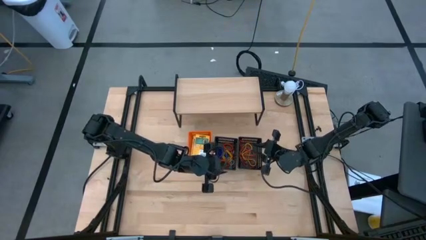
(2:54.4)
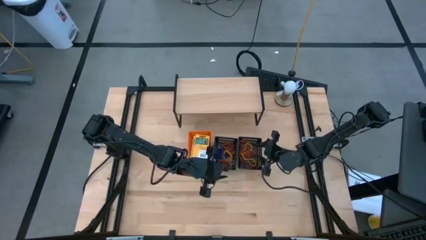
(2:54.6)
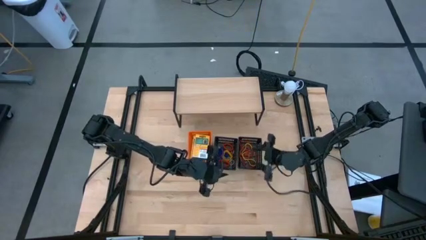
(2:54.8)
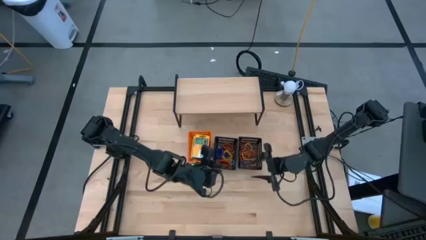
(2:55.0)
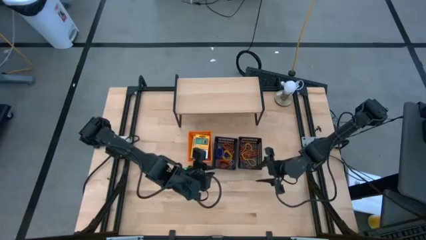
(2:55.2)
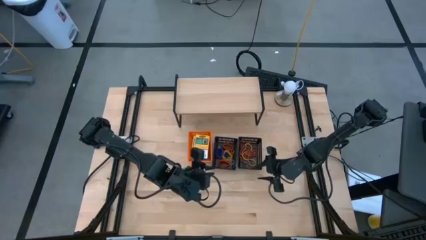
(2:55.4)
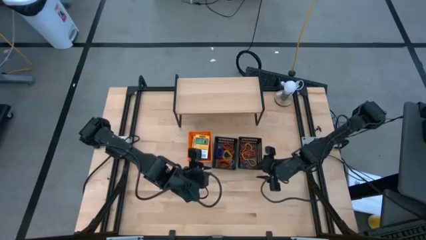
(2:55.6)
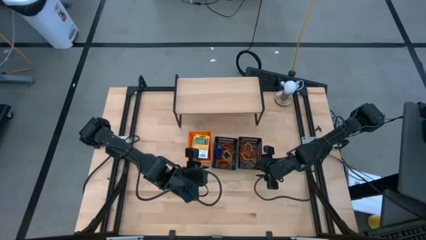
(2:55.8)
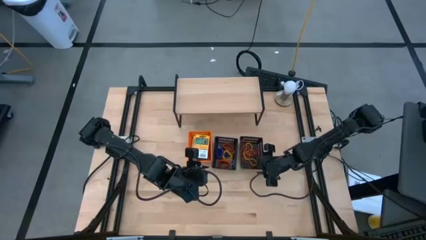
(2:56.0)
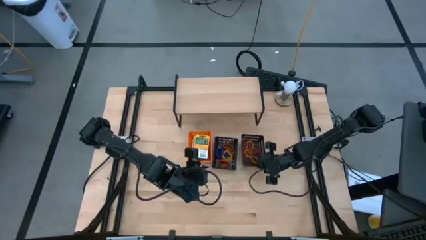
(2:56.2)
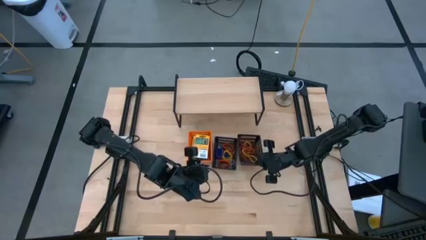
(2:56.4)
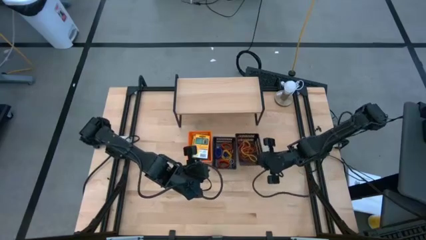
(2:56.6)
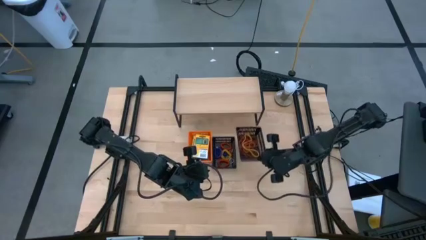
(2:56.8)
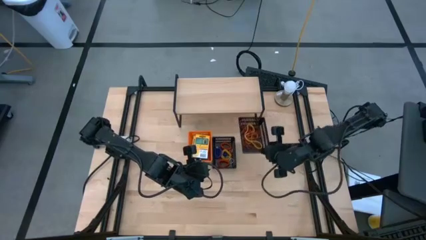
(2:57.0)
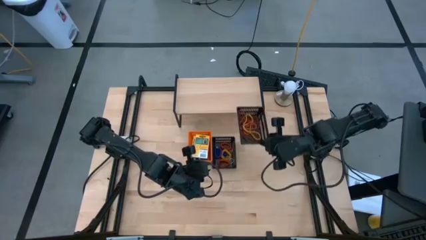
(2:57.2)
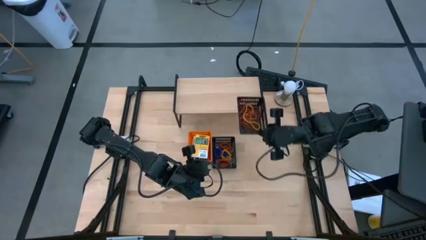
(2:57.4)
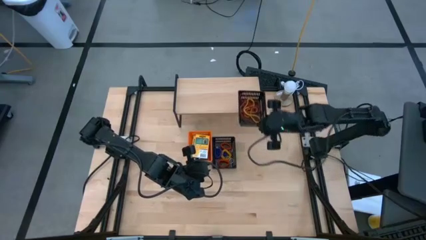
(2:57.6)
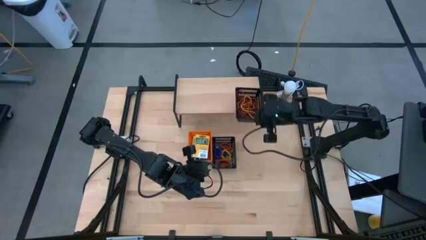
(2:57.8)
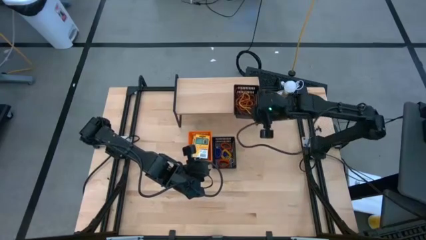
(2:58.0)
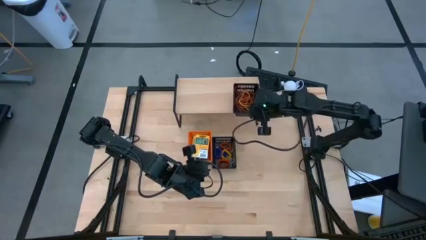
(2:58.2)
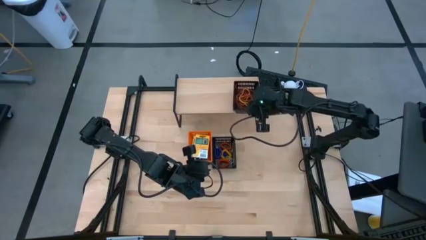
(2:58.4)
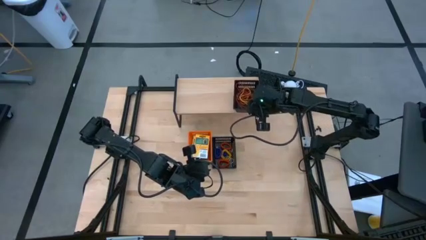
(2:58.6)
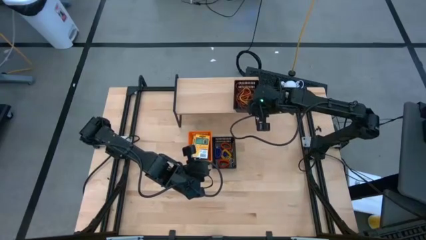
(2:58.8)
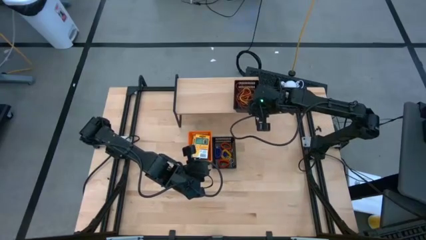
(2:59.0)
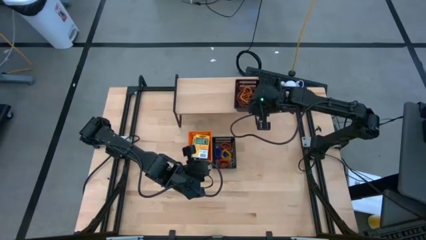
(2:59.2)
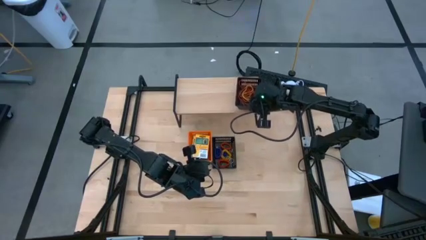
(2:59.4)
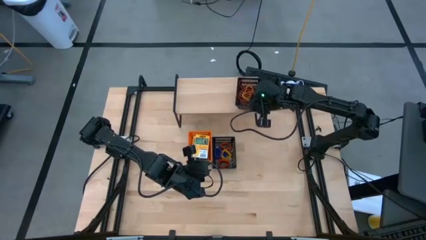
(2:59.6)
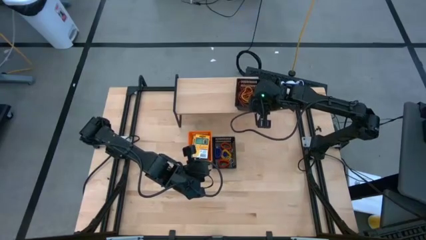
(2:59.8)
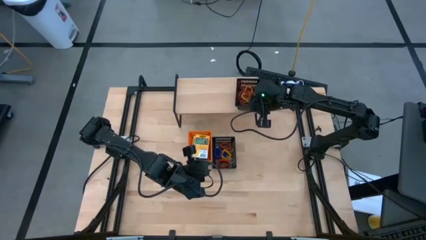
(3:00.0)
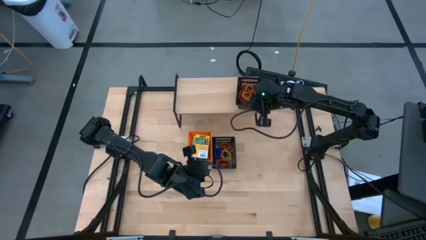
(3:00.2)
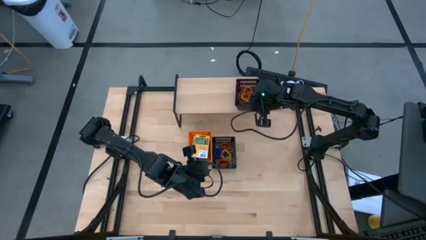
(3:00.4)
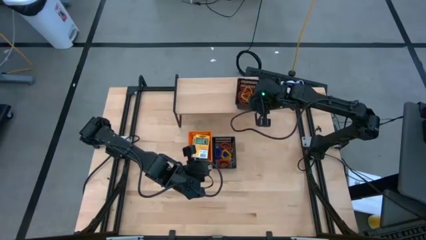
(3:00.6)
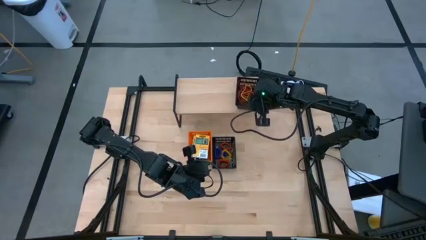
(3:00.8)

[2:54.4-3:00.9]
Task: Pick & Place Office Desk Supplies
Put the right black bin on the shelf

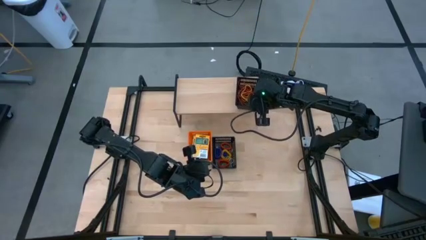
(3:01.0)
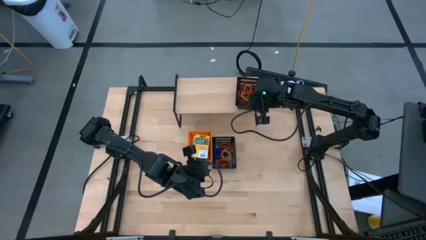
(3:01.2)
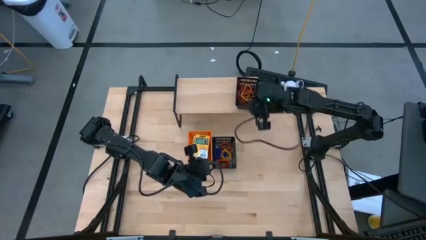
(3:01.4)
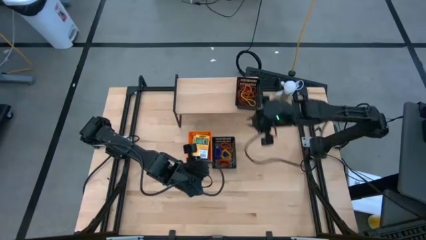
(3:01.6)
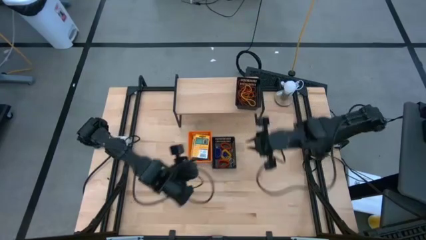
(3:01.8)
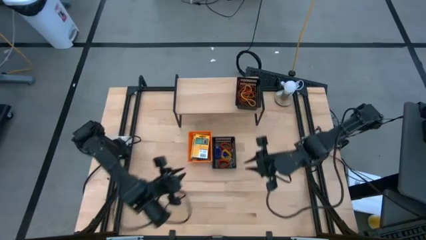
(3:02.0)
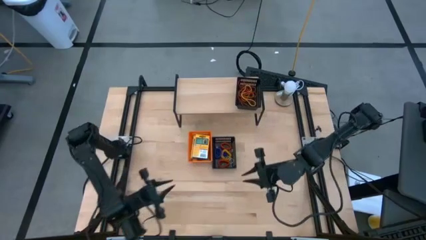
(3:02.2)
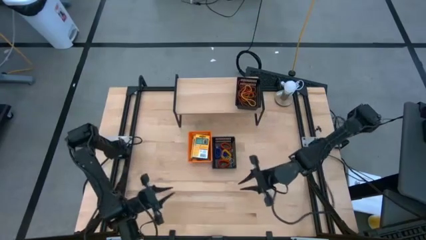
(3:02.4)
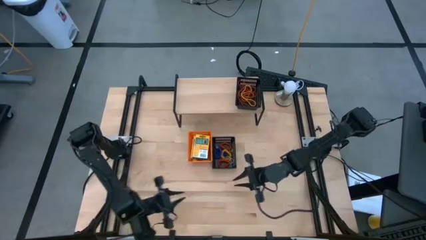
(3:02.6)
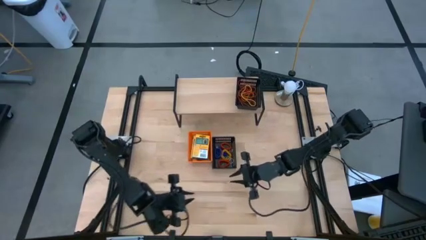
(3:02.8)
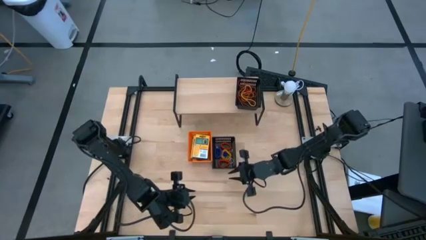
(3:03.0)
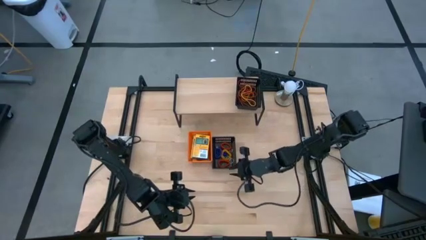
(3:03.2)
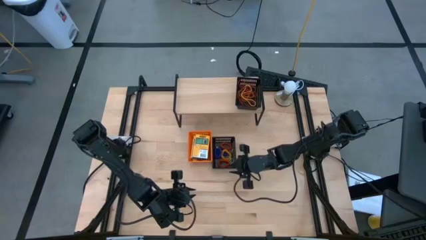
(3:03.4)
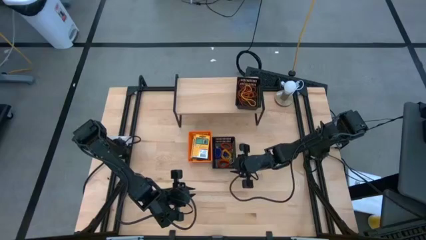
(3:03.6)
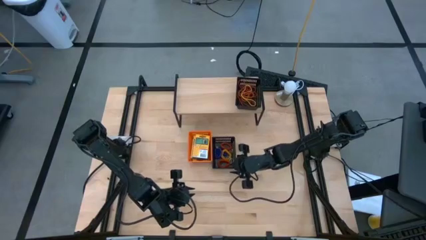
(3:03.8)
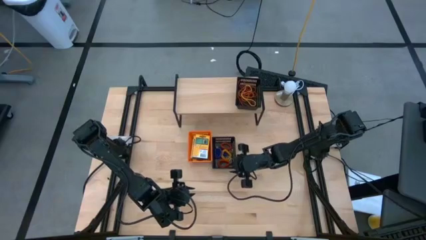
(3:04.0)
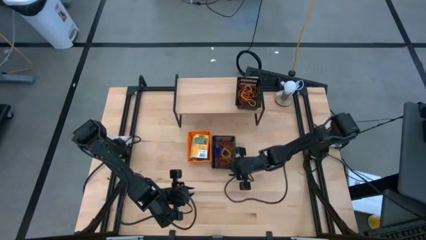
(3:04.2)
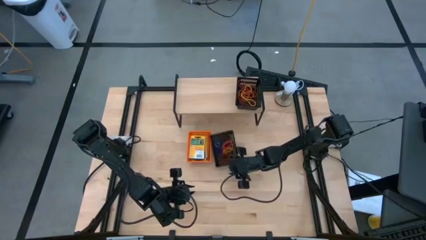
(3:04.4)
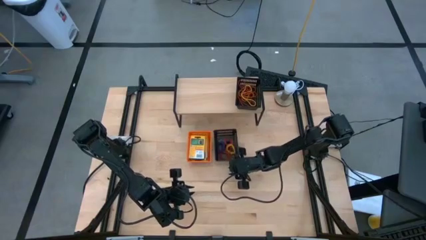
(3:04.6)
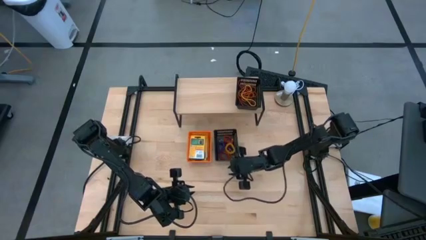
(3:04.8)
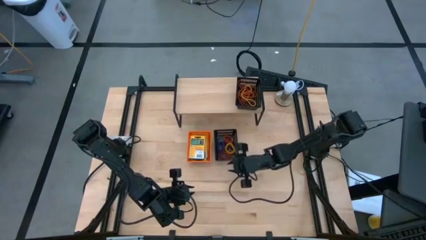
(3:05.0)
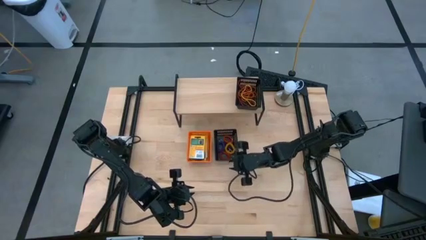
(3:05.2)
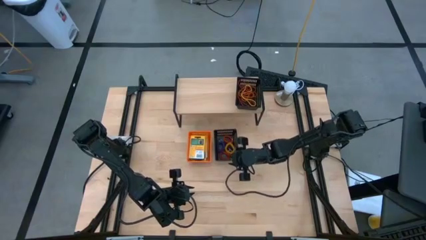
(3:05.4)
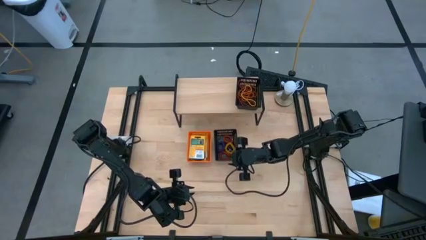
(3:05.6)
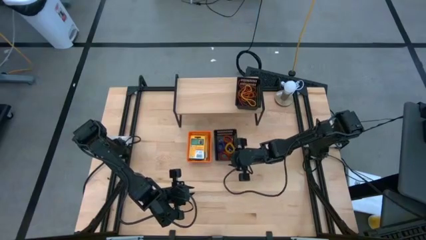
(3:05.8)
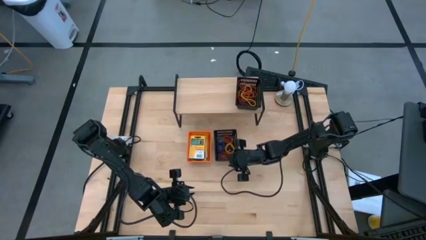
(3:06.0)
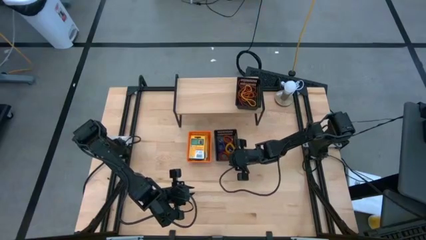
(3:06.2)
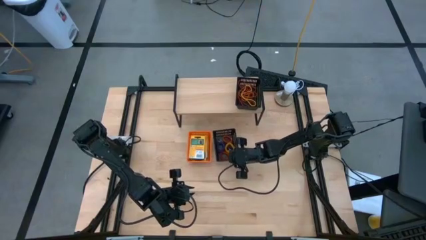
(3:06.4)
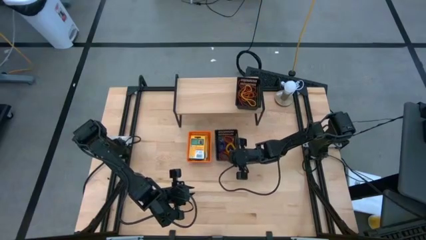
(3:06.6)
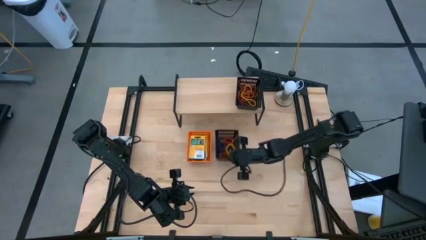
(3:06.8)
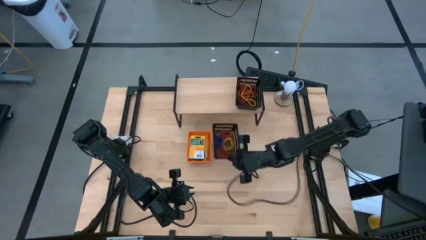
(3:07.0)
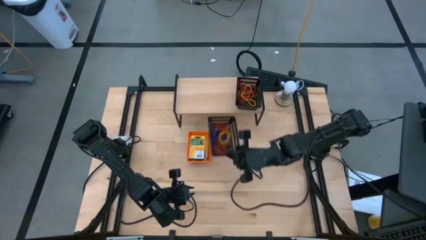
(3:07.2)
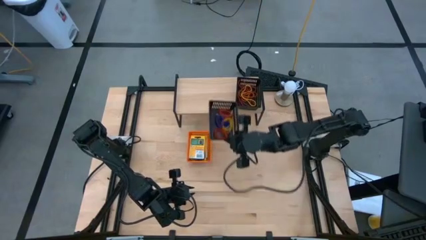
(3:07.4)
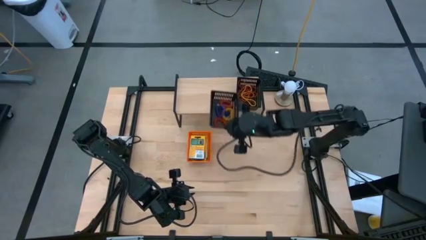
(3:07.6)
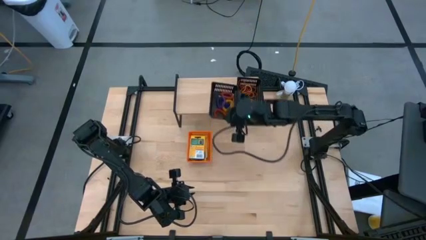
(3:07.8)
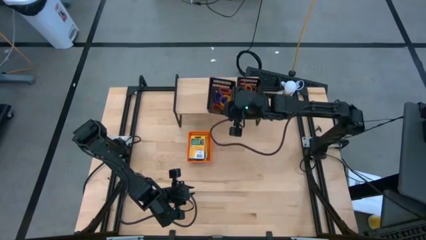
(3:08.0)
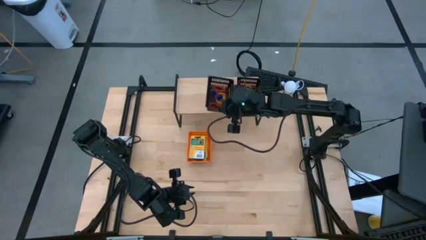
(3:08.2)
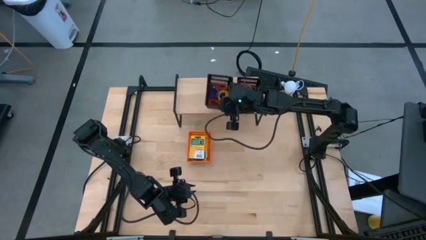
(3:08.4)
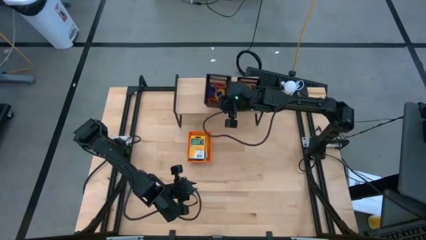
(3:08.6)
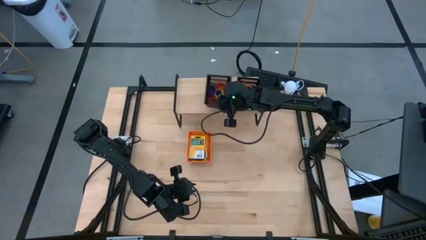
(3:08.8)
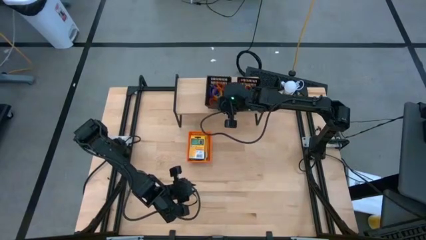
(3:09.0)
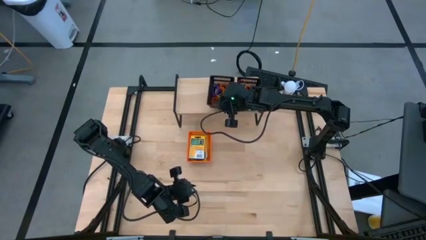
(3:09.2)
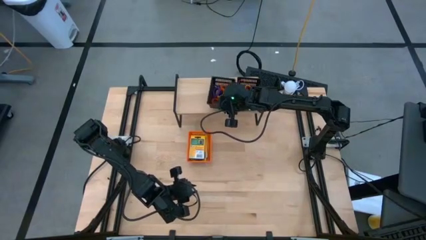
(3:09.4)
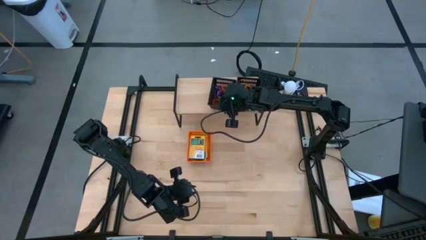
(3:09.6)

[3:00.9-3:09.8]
Put the black bin on the shelf

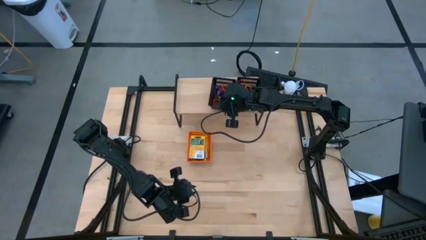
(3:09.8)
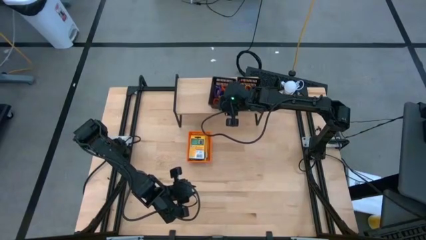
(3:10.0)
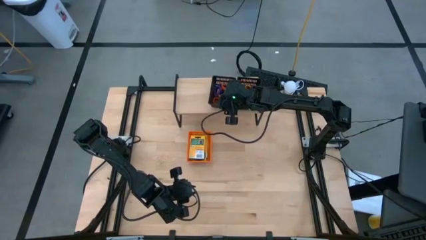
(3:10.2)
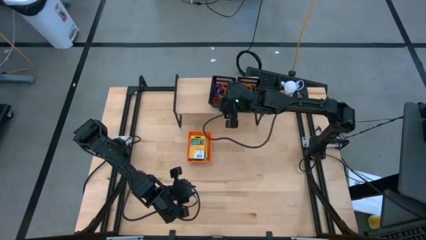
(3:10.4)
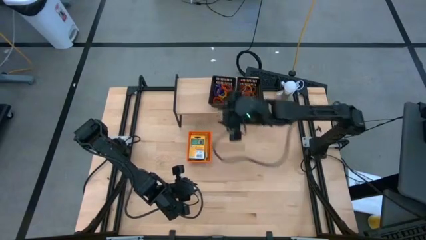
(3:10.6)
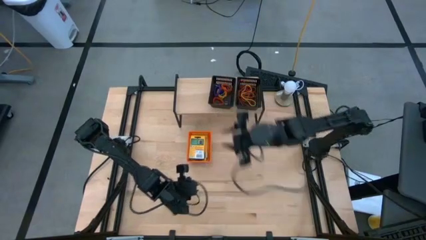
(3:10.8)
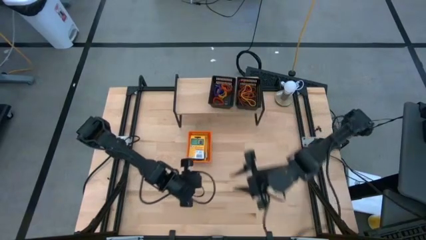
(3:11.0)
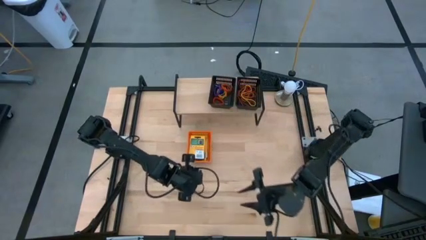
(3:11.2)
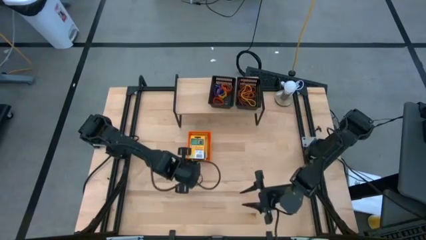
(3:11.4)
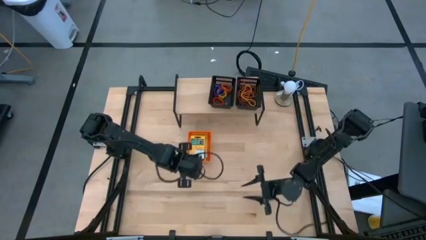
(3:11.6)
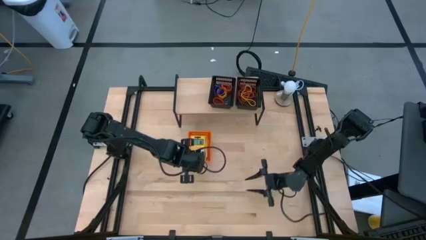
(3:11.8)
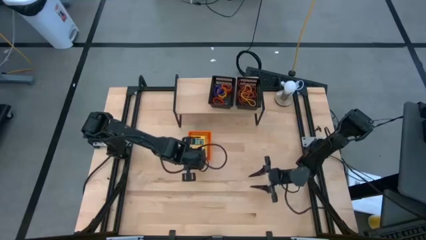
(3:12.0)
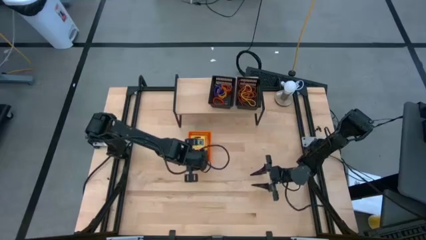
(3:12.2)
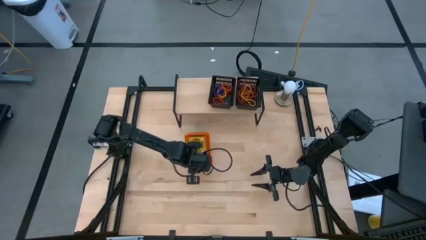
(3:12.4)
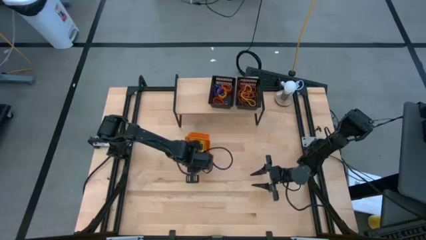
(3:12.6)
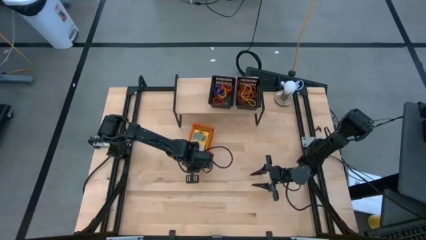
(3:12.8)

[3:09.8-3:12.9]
Put the orange bin on the shelf
